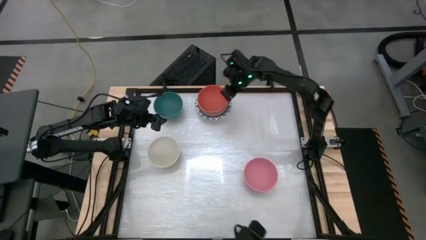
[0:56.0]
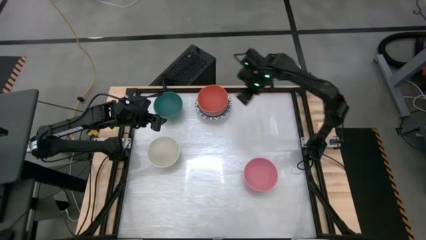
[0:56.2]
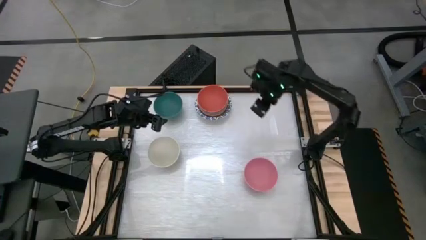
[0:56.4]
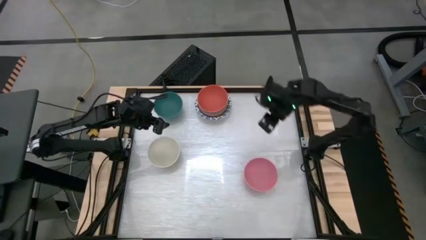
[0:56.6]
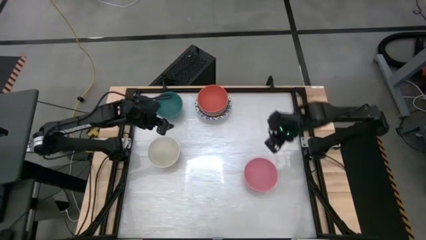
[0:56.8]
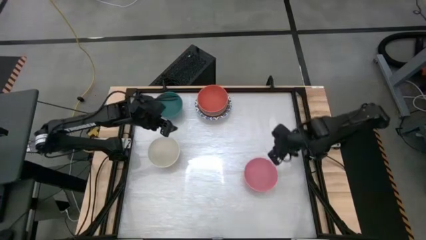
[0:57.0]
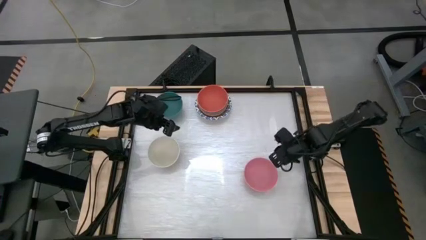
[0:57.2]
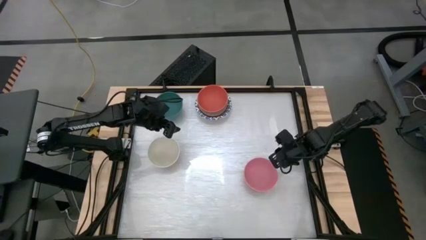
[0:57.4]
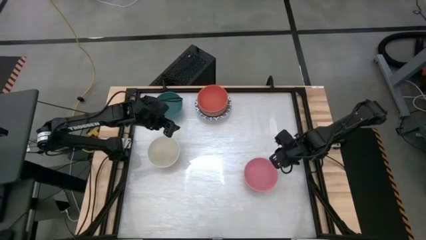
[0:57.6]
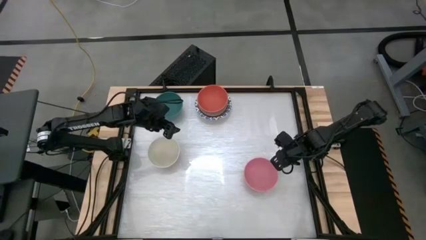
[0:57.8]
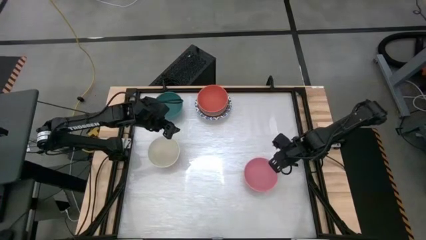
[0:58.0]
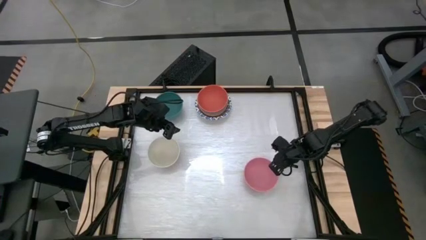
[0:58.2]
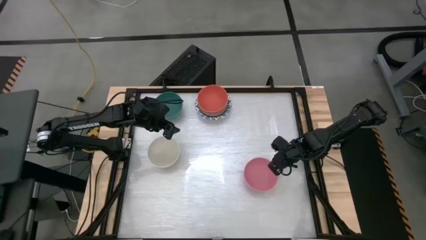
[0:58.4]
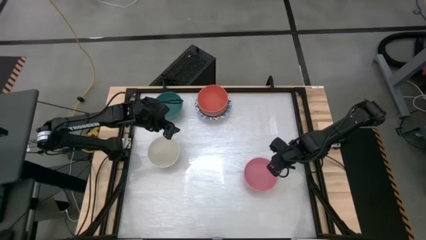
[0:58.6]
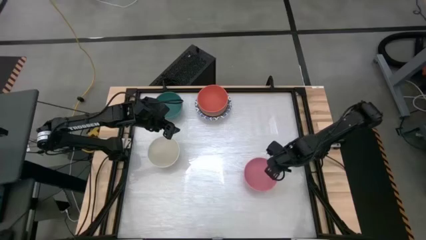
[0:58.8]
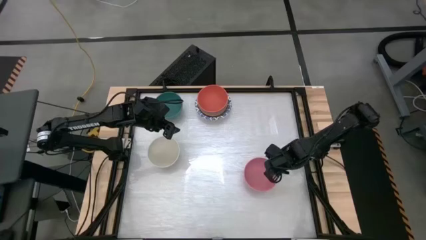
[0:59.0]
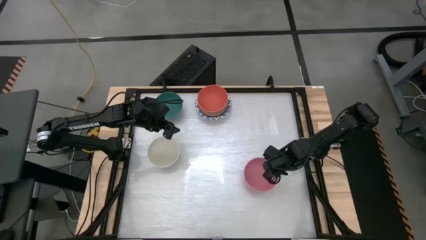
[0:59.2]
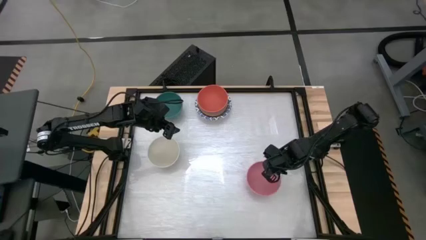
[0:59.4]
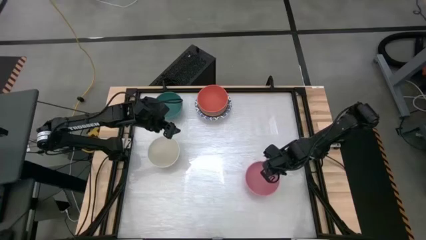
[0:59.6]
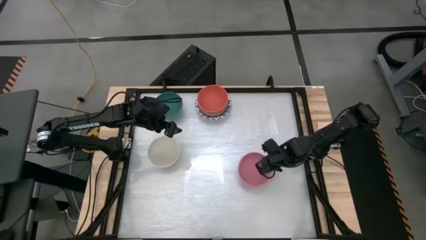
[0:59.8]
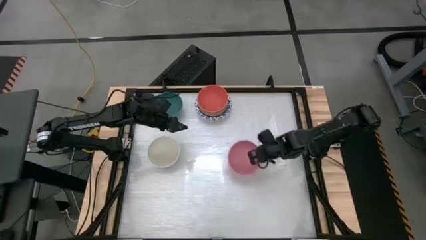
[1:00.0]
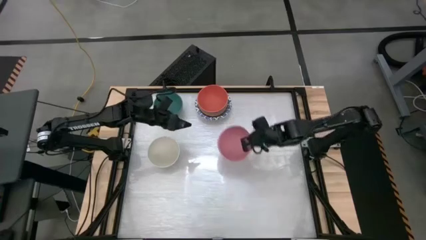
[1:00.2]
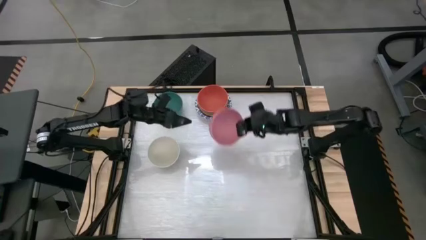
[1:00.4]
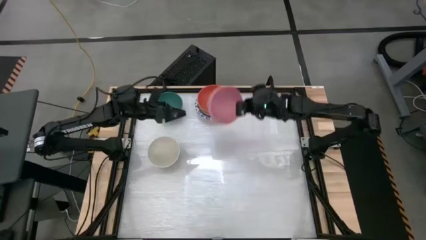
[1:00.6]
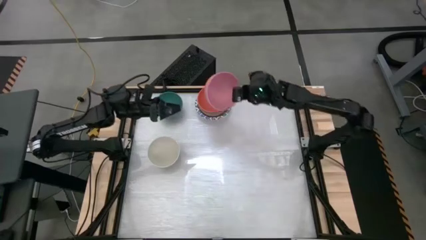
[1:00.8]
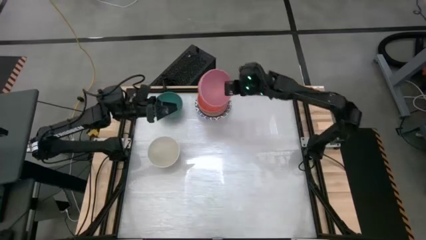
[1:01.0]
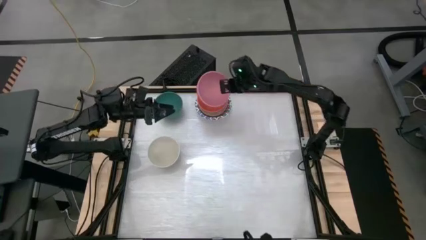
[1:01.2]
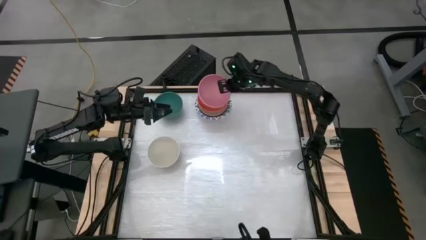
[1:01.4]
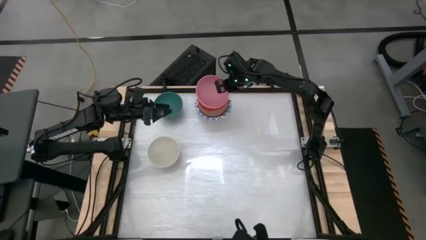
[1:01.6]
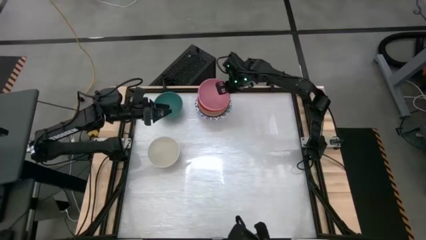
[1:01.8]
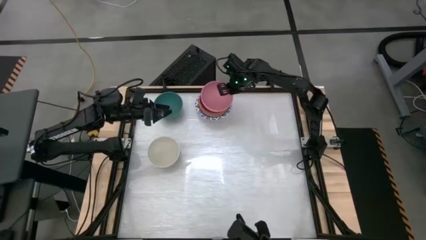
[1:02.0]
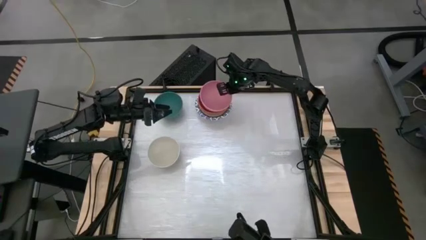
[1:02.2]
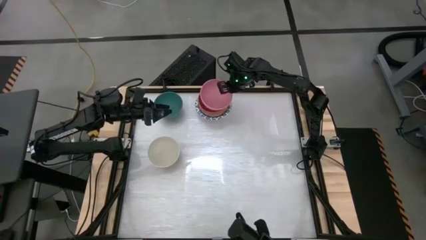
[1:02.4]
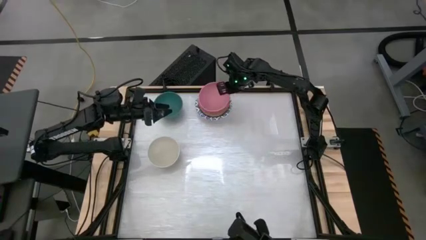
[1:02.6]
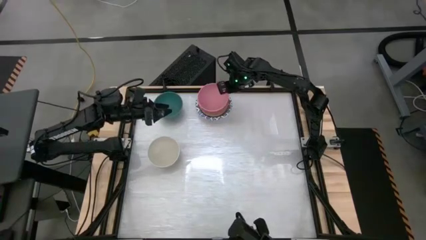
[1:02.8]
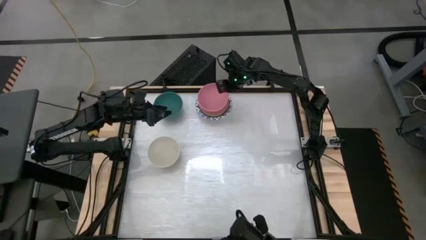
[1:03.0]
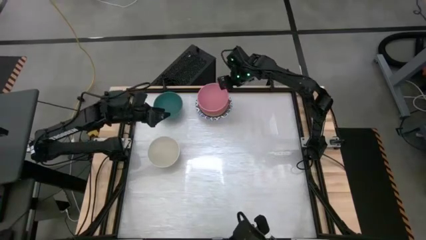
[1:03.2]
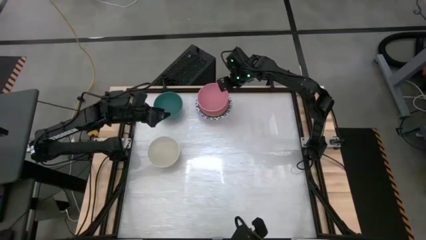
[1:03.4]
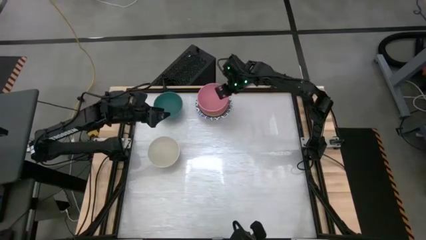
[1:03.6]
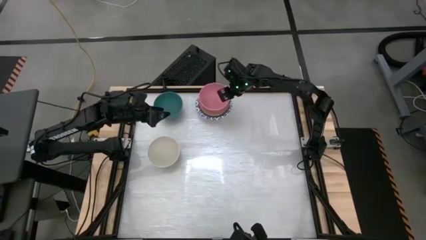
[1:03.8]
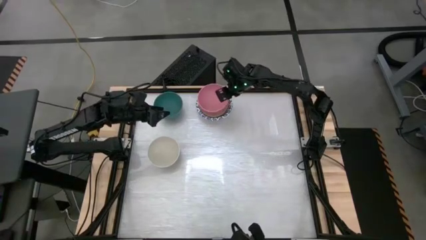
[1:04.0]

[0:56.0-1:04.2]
Task: Nest bowls inside each other by size order
Stack the pink bowl on top of the orange bowl

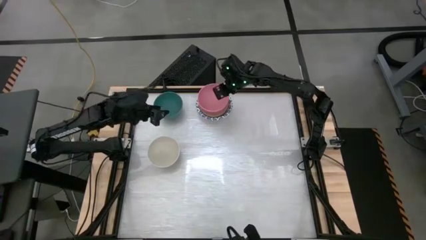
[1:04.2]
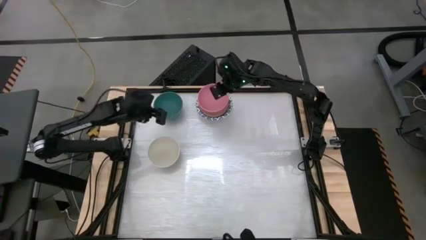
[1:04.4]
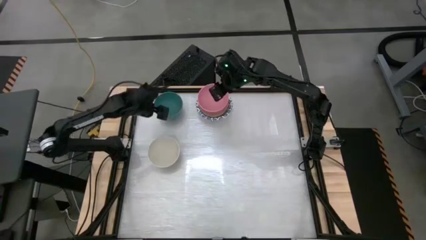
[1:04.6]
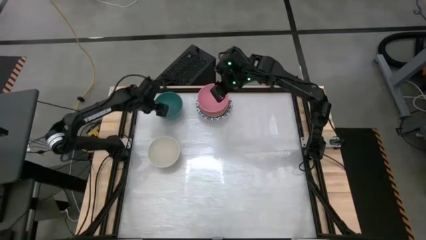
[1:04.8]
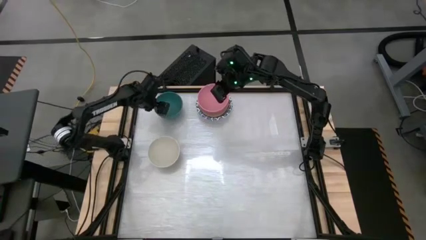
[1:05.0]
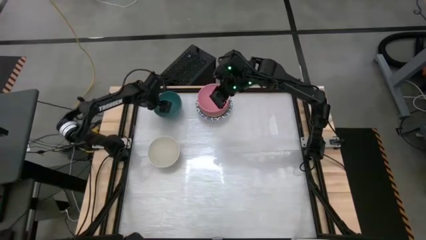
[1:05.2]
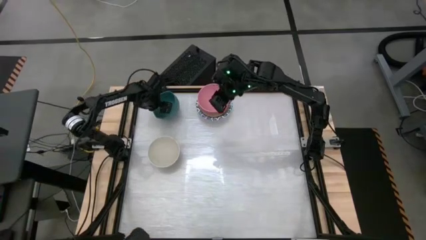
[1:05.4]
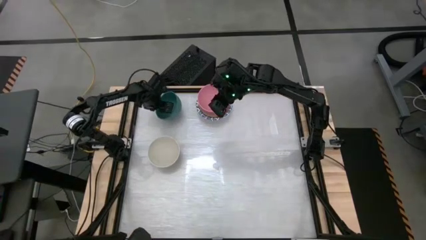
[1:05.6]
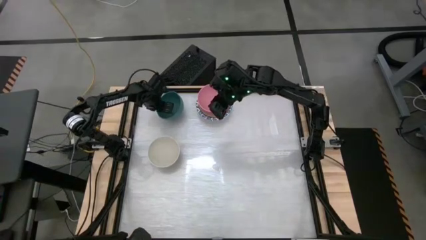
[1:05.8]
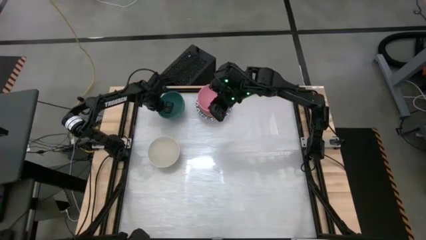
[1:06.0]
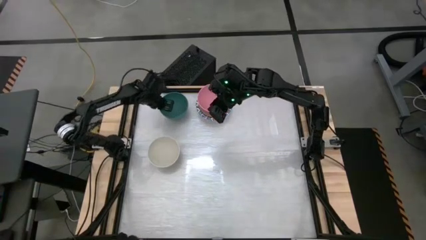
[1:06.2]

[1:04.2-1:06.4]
Stack the dark green bowl on top of the pink bowl

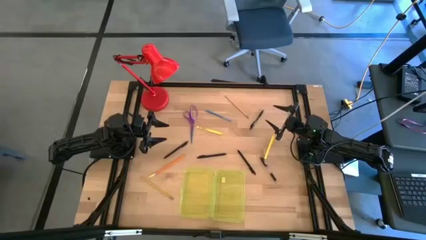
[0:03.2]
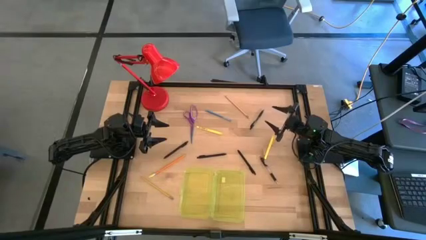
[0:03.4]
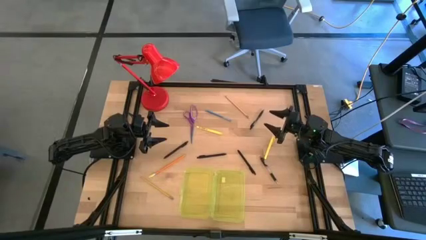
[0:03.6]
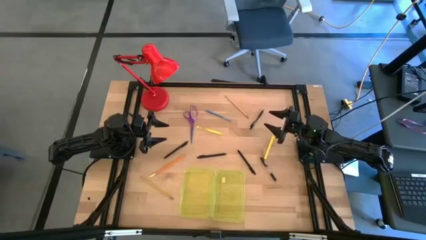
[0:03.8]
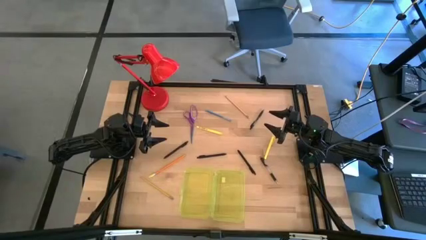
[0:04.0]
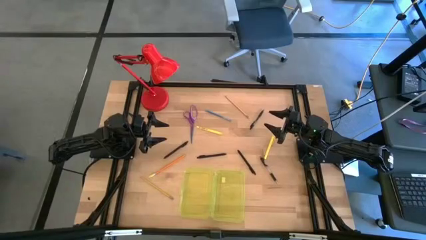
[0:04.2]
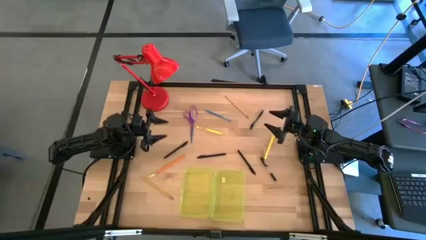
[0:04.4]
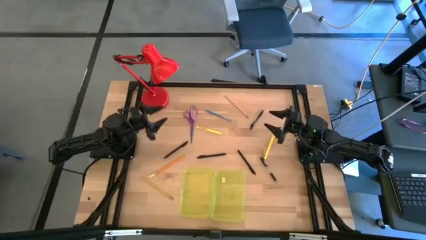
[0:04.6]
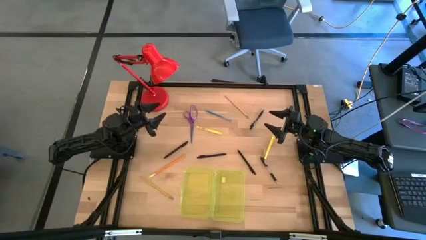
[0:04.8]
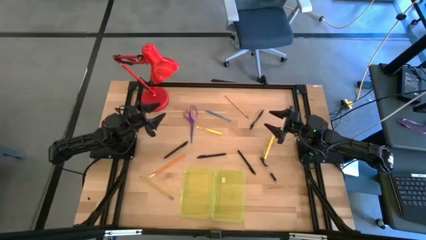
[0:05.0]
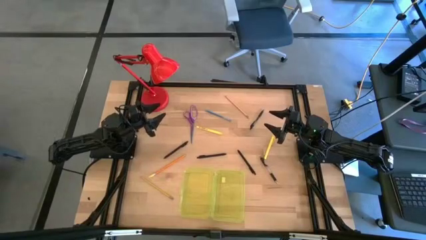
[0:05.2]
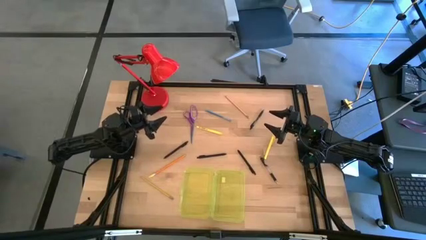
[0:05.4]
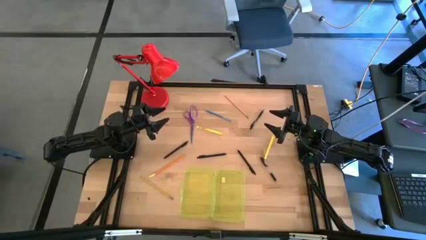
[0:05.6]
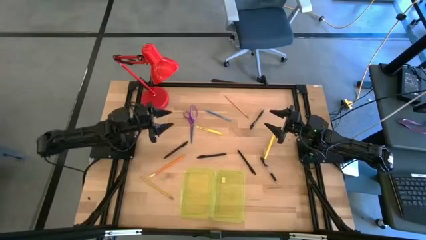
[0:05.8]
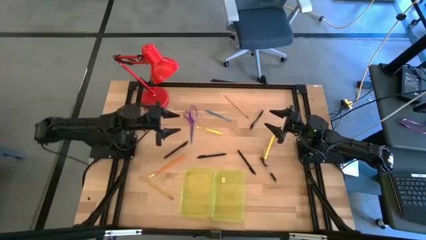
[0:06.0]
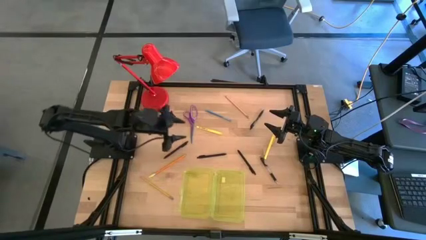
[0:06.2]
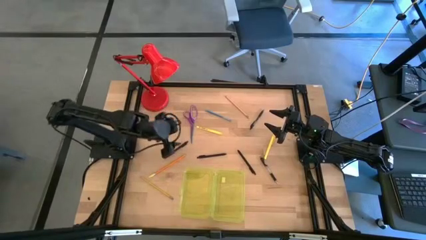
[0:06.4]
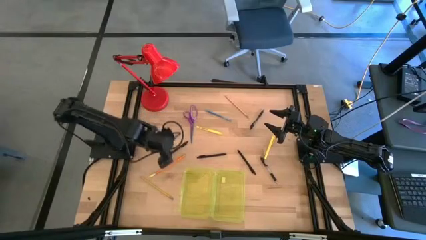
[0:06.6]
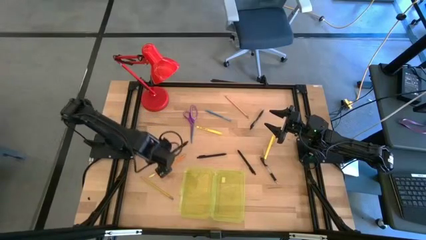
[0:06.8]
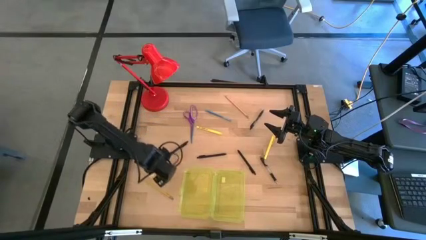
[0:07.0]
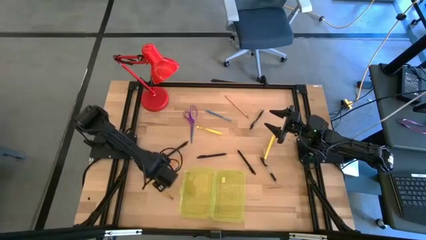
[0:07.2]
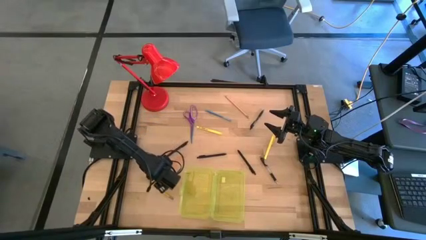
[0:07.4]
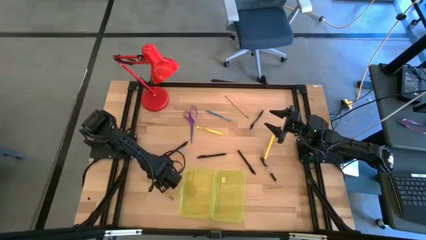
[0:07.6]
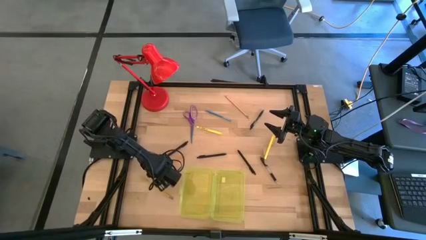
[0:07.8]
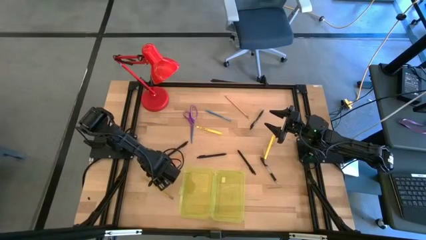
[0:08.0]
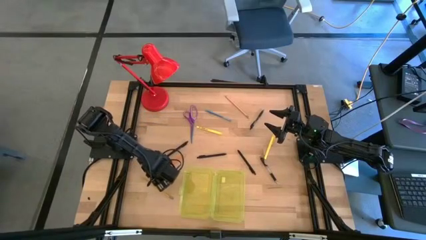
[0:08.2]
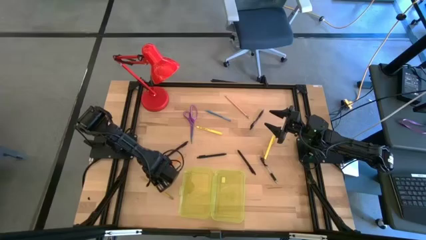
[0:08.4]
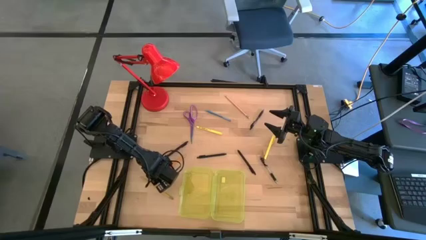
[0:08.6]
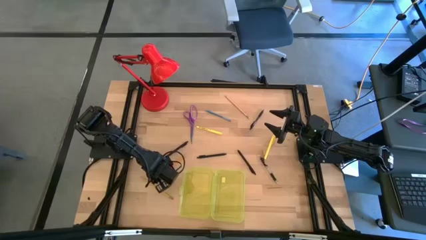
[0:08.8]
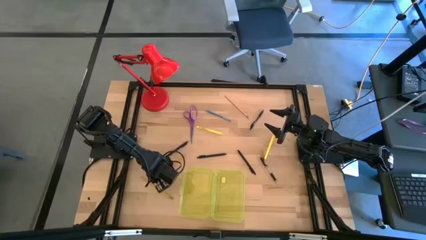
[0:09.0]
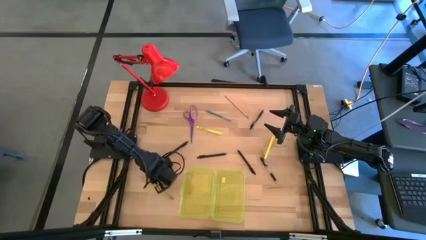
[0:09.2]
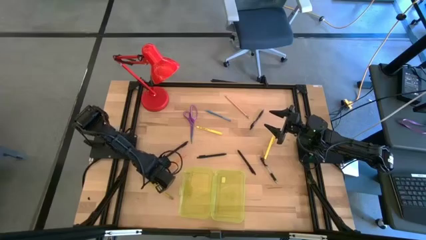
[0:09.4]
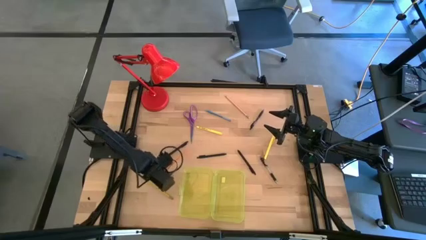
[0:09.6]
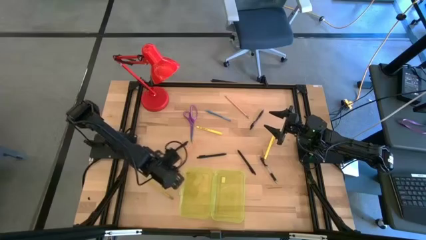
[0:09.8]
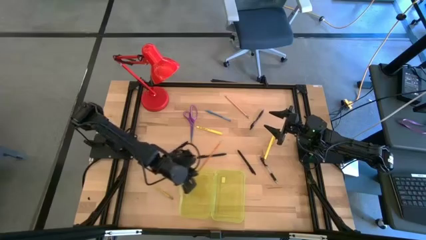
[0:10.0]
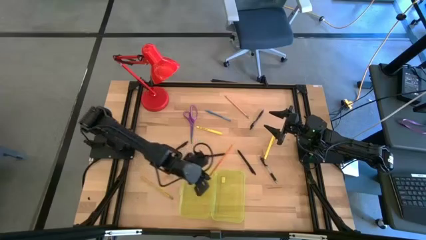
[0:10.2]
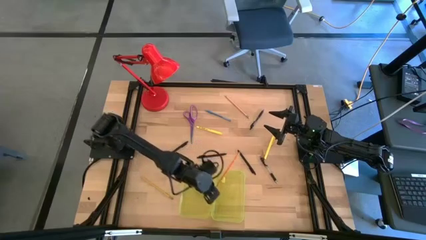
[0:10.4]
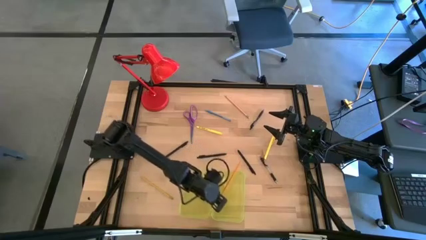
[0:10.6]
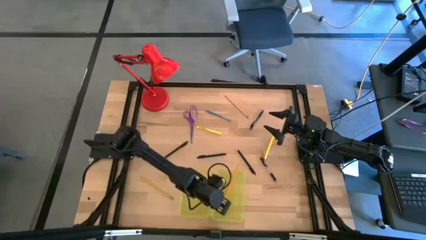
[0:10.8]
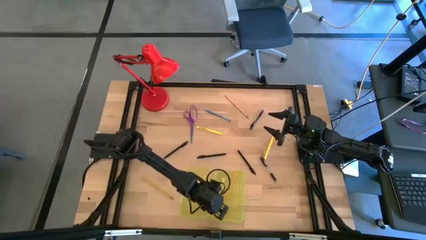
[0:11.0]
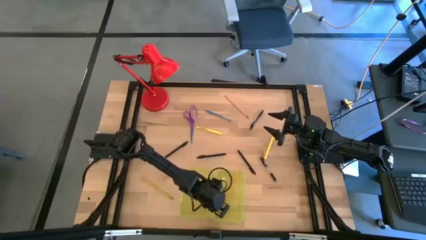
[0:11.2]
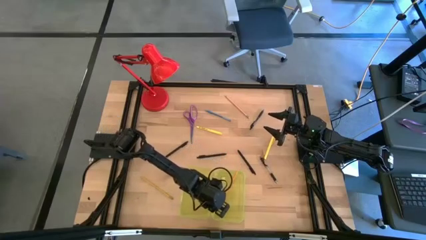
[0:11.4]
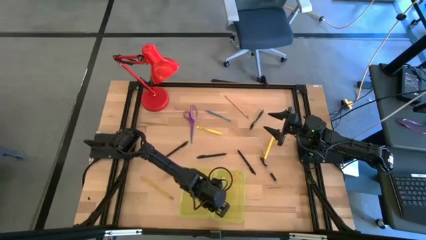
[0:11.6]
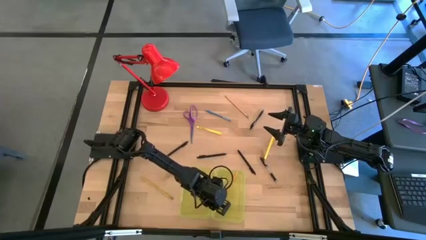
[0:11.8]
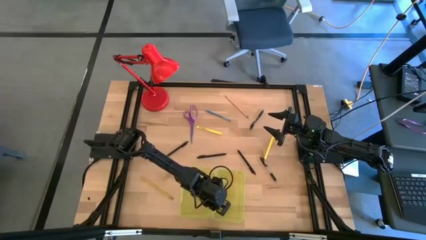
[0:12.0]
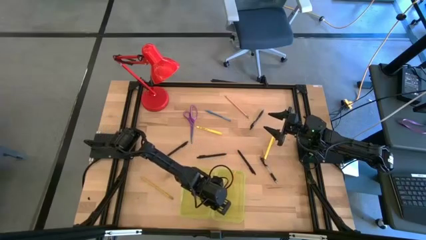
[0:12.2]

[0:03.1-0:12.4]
Task: Pick & place school supplies into a supply box
Put the orange pencil into the yellow supply box
